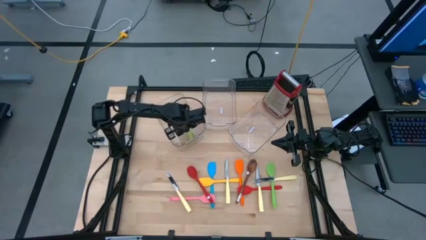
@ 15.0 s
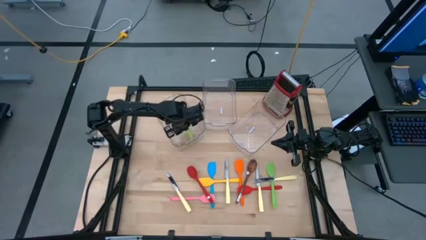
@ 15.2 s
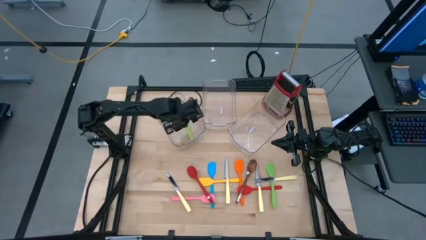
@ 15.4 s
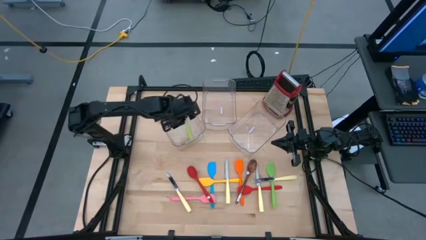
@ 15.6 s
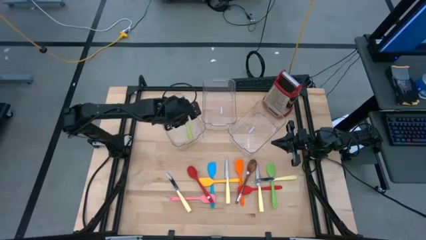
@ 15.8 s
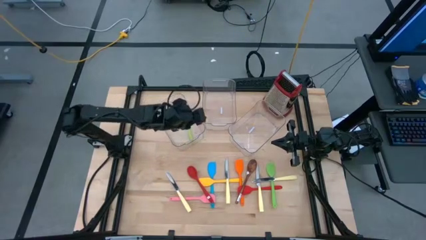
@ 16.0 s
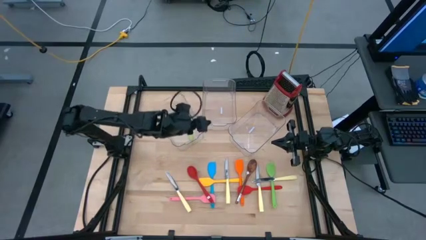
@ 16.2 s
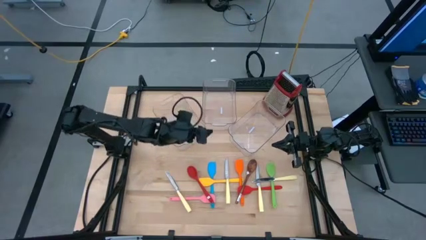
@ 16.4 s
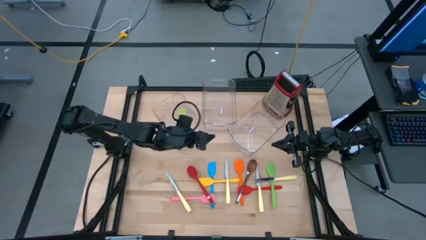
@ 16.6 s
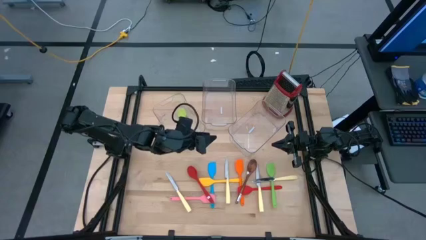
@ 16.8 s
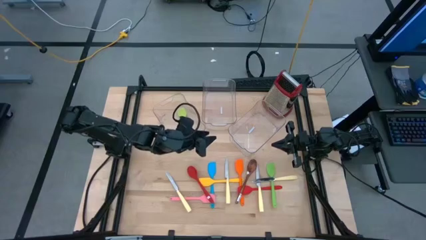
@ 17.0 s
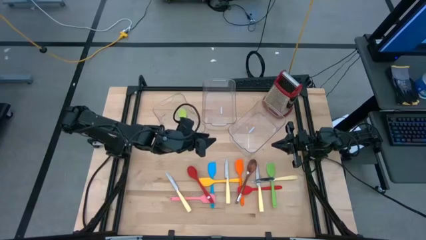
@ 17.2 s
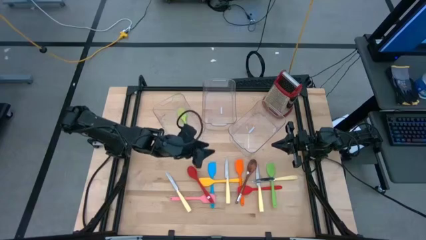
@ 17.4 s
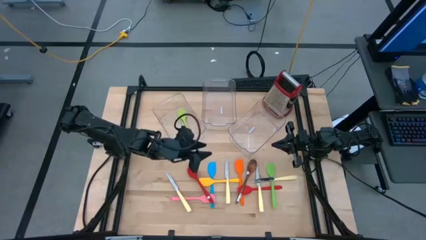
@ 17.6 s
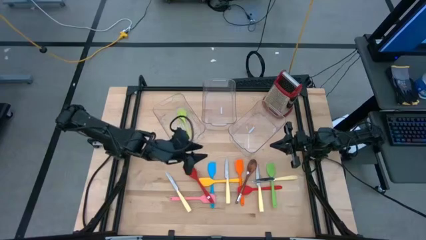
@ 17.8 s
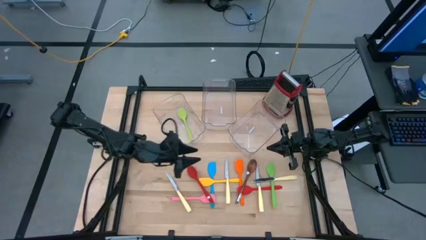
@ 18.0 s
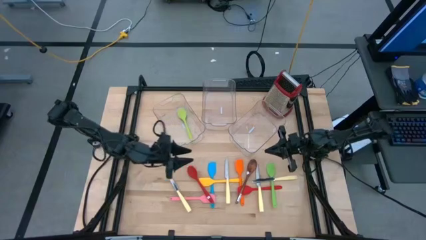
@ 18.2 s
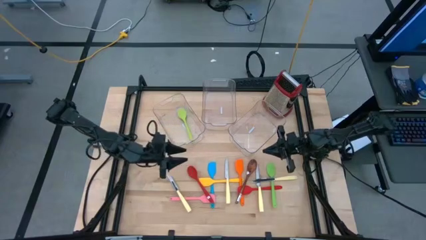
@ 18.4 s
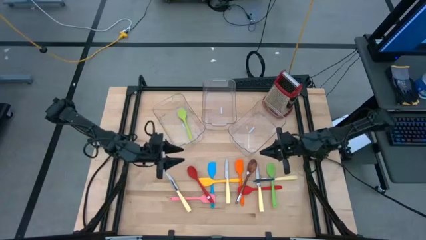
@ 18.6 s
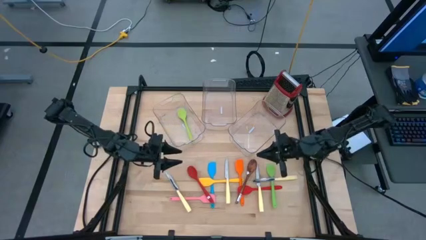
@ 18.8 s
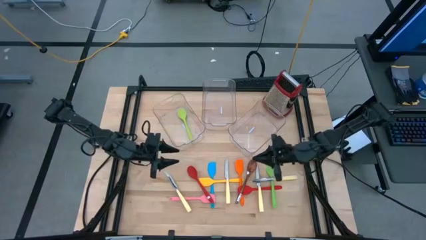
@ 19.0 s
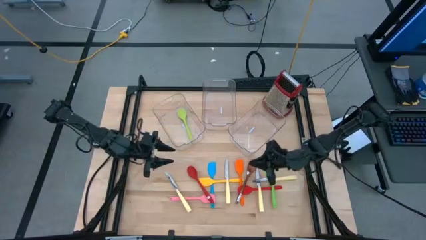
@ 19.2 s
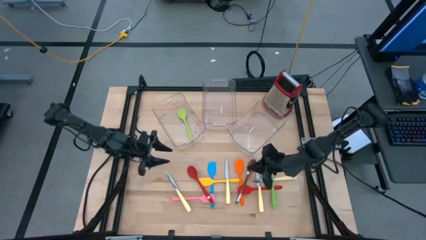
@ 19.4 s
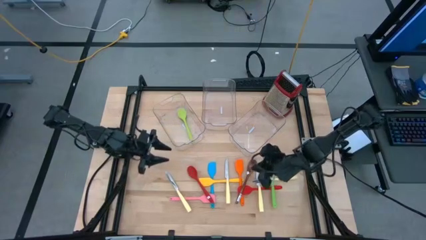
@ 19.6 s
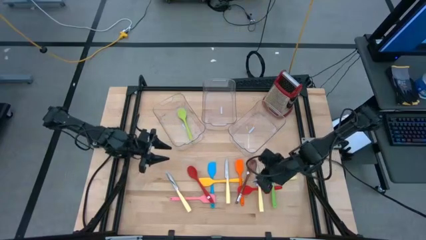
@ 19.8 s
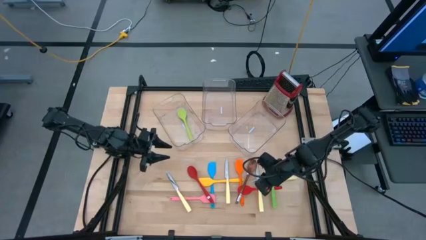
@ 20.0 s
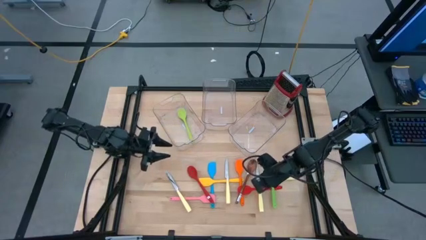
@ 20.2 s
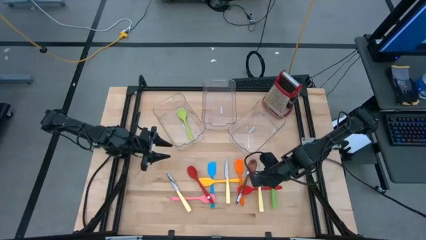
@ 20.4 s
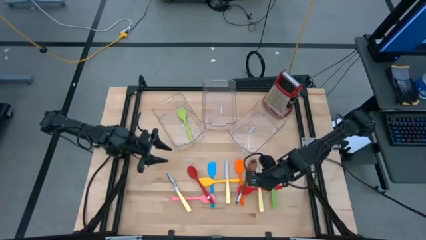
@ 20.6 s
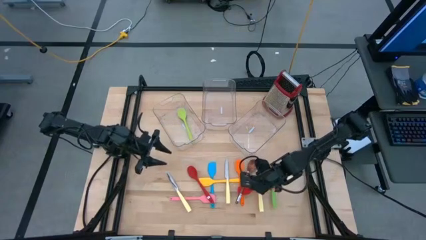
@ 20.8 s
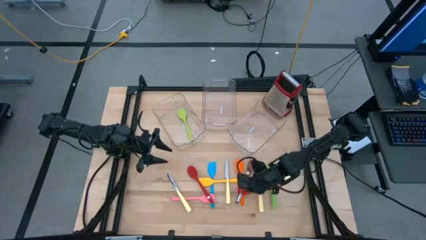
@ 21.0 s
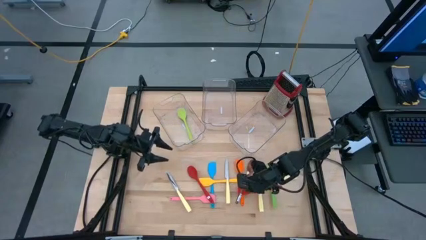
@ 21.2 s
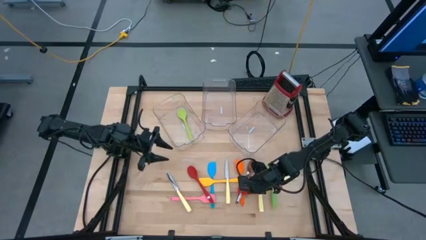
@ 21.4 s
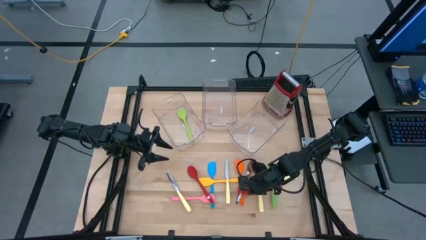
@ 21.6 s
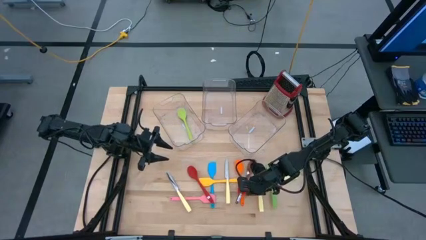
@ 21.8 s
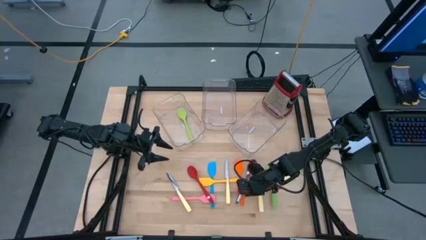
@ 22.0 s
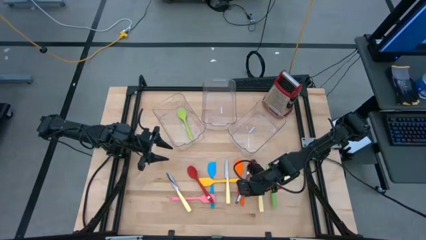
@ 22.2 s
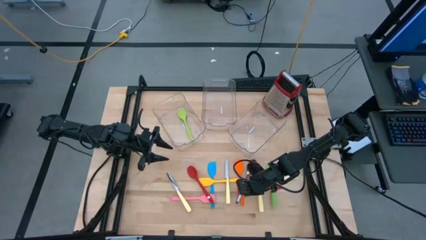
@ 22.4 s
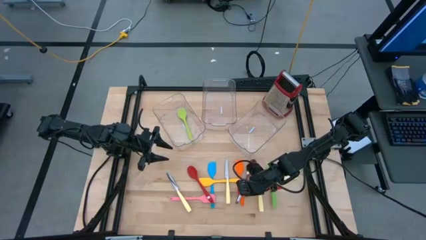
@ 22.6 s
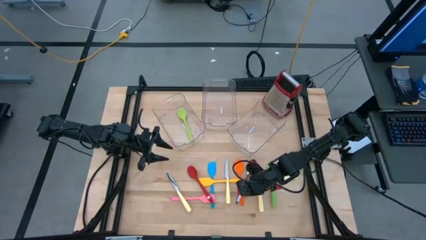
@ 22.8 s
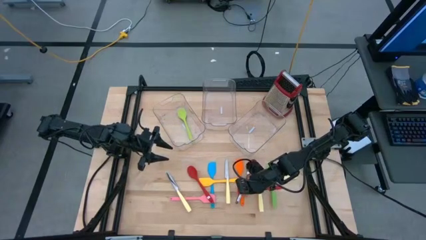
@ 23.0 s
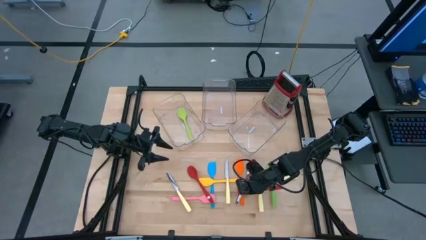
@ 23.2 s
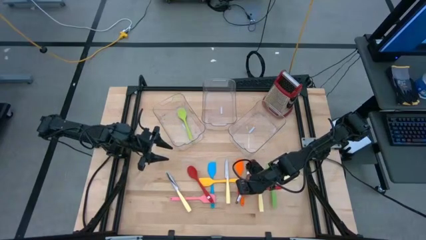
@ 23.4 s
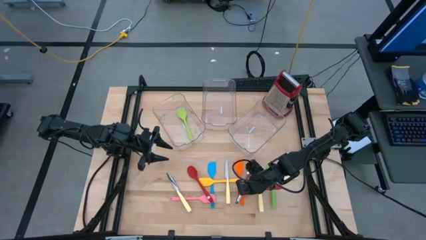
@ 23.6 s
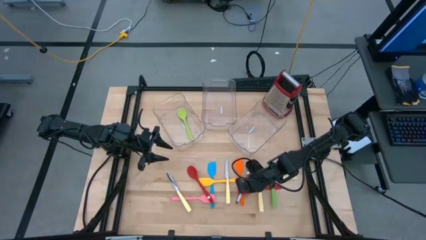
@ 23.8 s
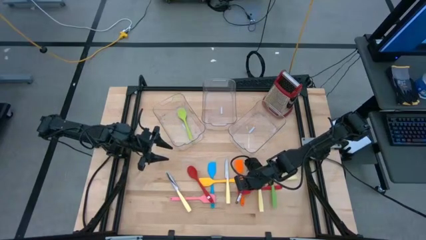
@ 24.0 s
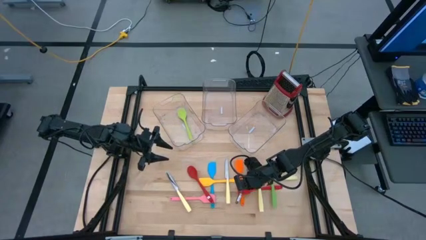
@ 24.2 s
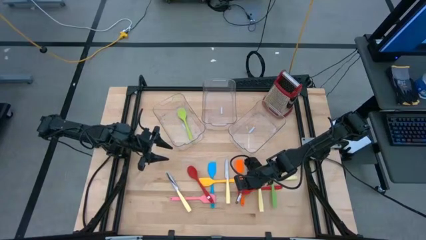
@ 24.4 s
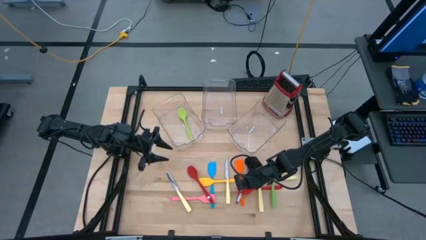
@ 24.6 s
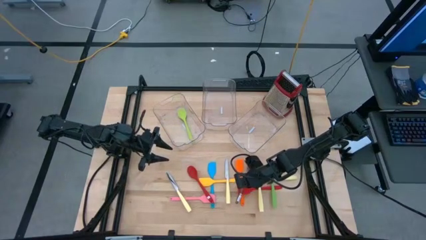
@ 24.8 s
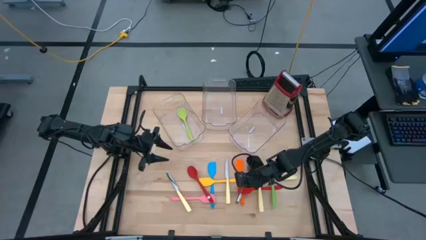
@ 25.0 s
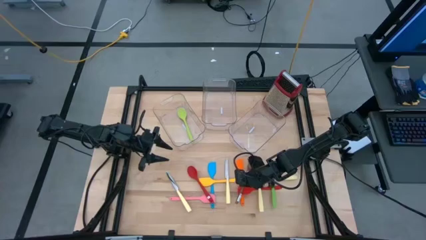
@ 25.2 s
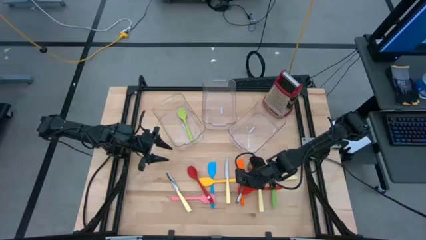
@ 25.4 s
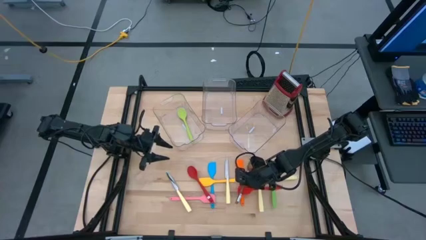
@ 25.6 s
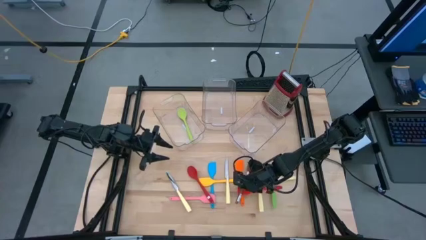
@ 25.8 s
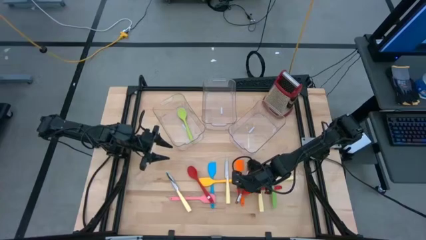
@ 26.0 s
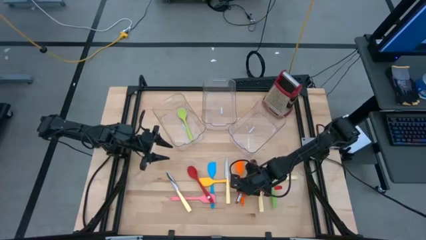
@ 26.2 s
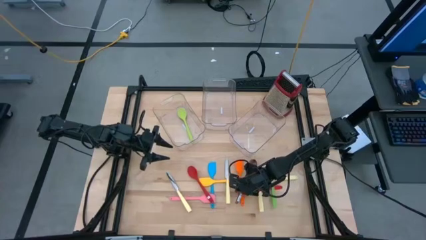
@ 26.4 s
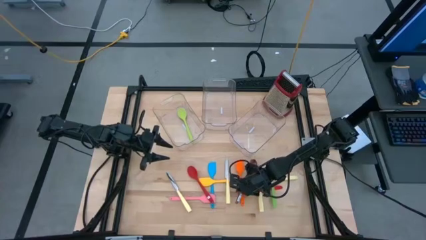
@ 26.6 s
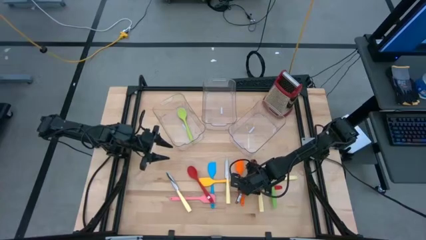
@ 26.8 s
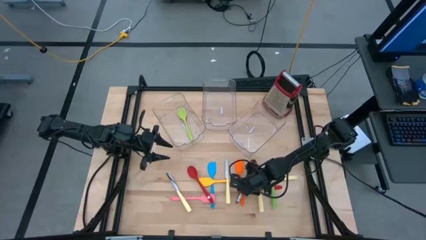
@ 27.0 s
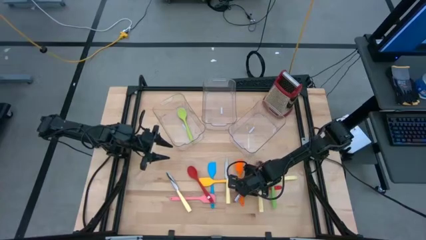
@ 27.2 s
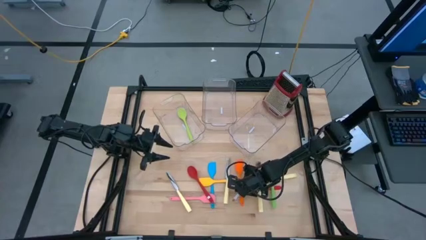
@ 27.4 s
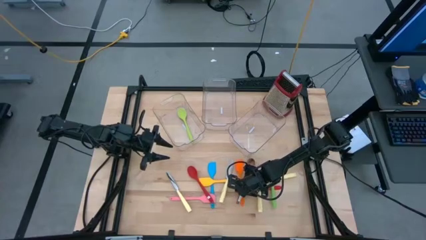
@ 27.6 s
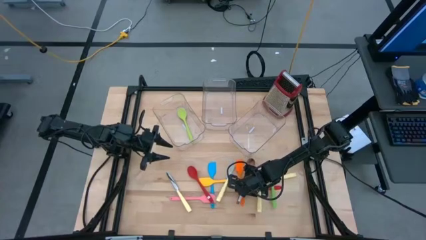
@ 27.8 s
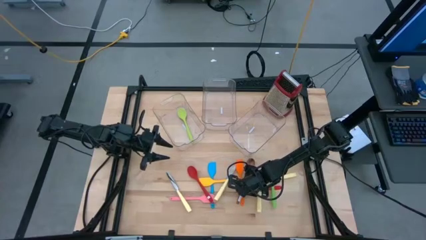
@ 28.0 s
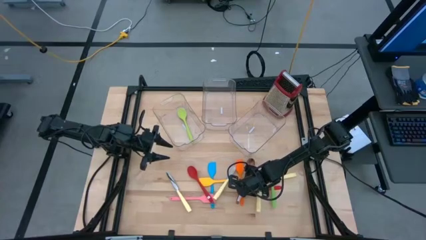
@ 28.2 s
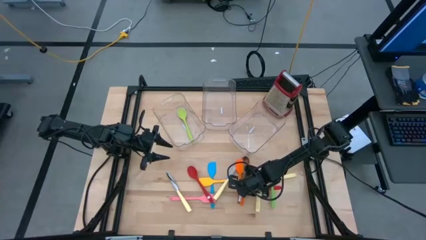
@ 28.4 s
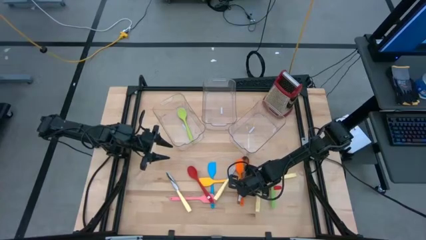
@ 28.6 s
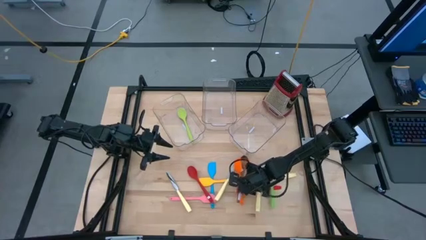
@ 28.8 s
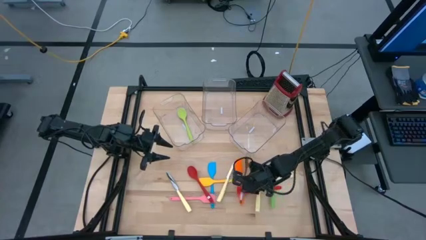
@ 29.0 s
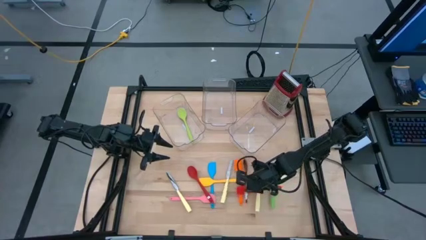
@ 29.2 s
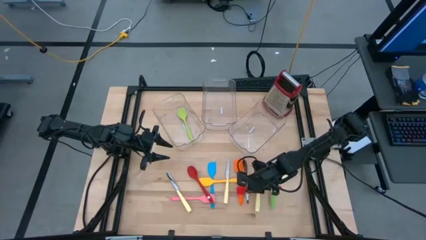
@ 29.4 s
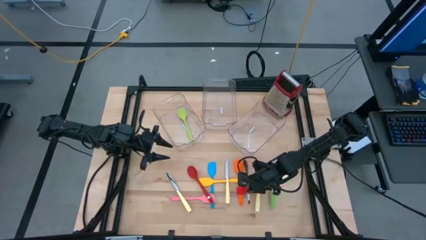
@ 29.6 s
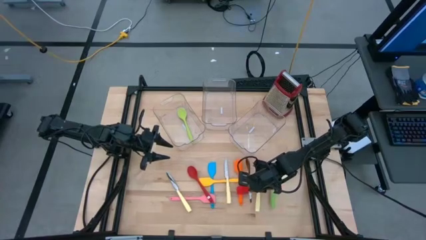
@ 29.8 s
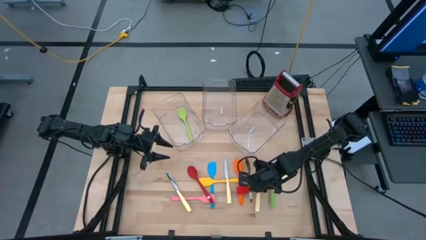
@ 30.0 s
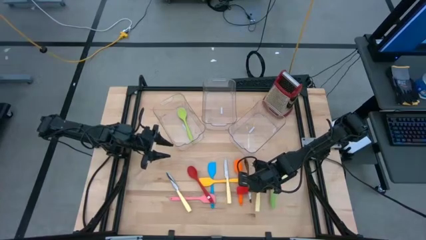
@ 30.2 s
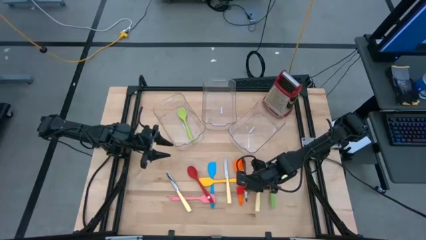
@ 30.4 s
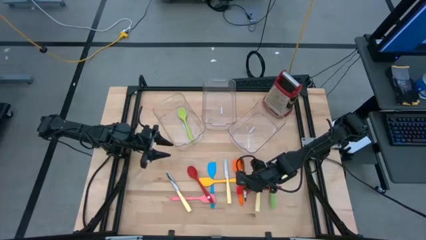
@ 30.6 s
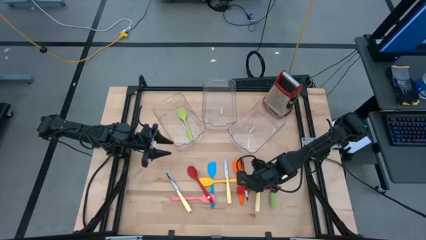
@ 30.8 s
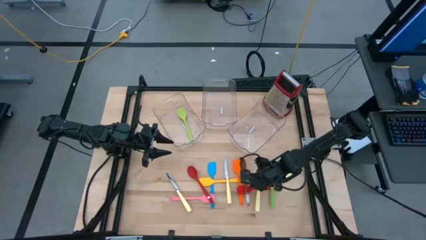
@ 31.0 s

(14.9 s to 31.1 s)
Task: Pick & Place Kitchen Items
Put the brown serving spoon into the left transparent bin
